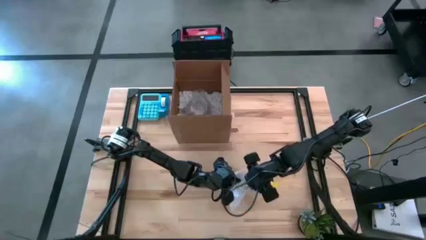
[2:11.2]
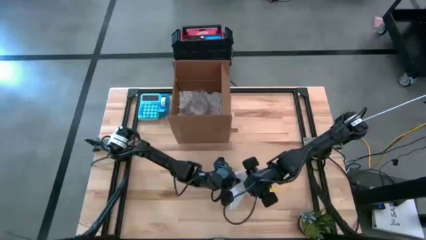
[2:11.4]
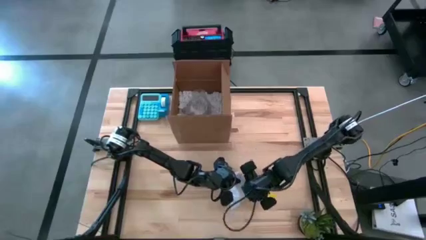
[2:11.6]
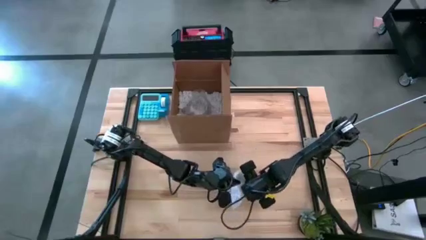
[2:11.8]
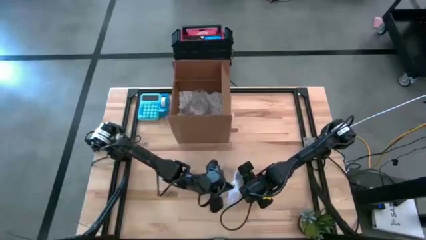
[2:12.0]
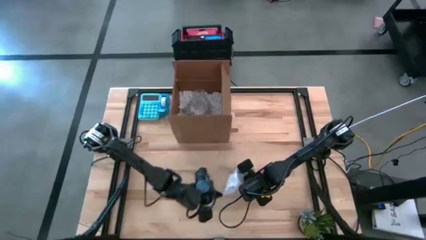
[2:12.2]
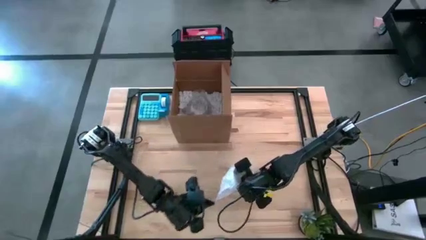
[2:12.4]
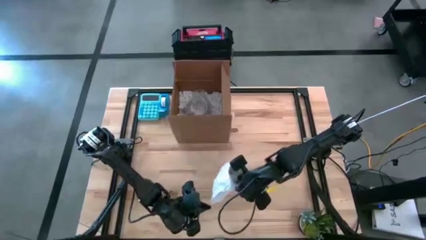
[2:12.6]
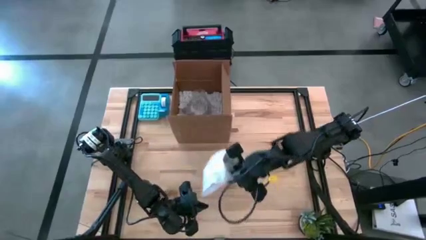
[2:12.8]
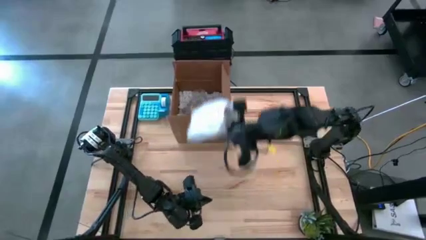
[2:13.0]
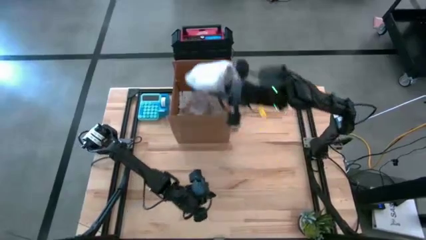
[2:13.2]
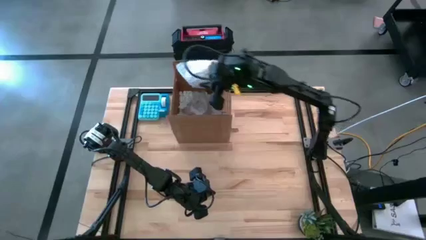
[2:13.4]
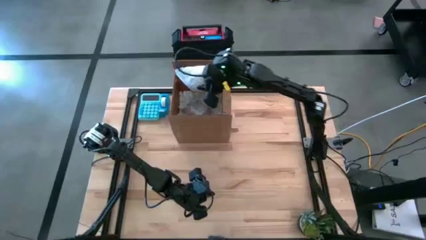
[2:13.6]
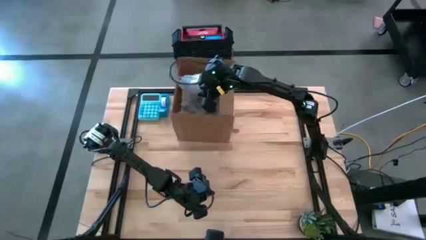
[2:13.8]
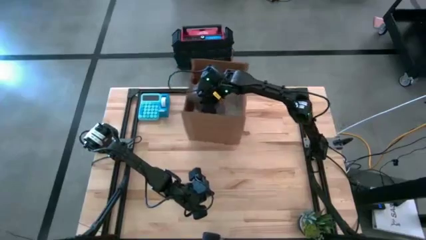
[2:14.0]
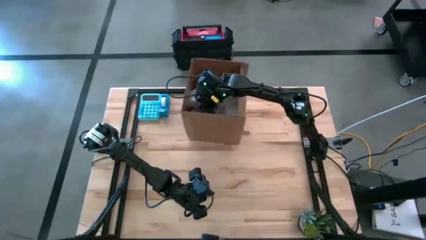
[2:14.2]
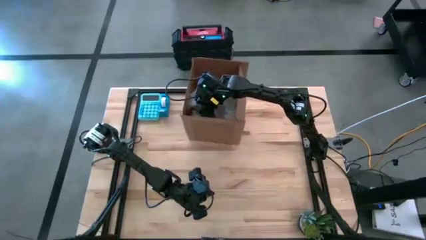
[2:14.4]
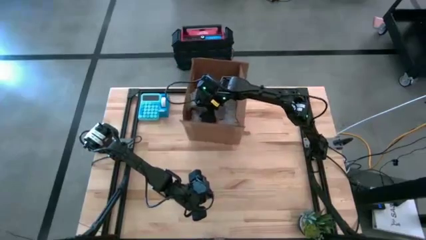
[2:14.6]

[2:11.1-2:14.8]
Task: wrap mug
Put the wrapped white mug into the box

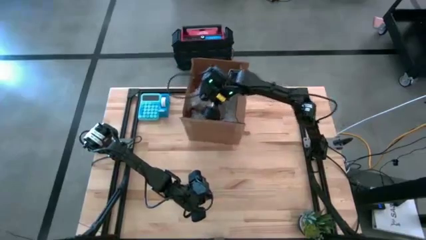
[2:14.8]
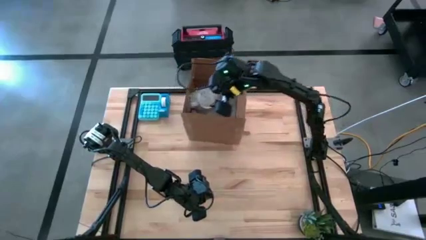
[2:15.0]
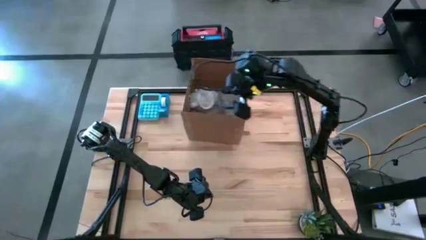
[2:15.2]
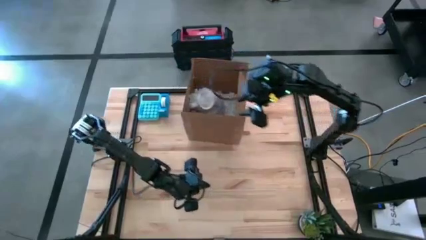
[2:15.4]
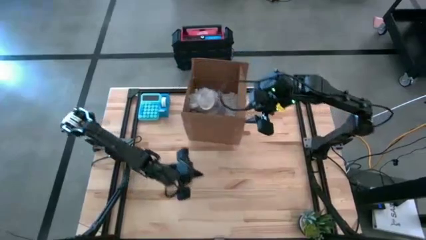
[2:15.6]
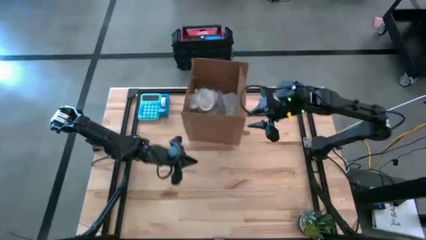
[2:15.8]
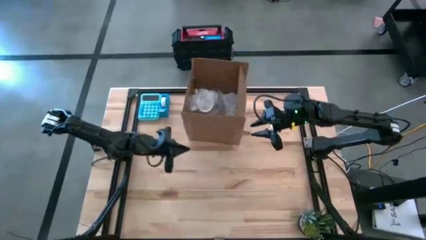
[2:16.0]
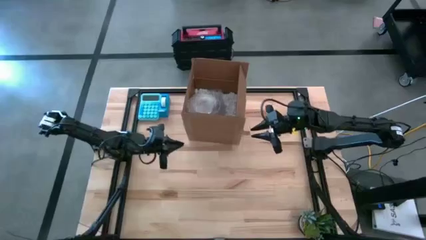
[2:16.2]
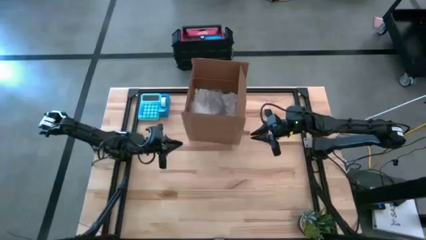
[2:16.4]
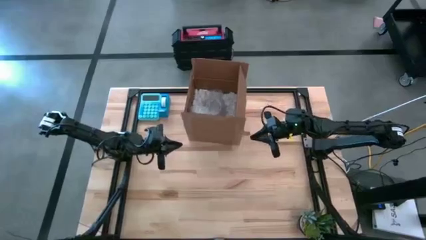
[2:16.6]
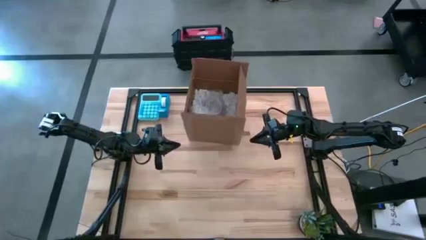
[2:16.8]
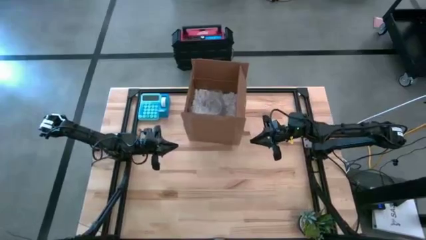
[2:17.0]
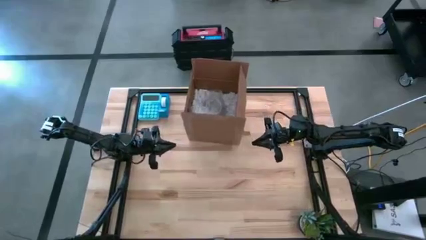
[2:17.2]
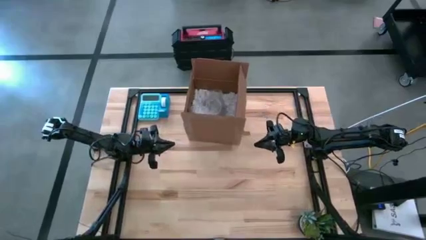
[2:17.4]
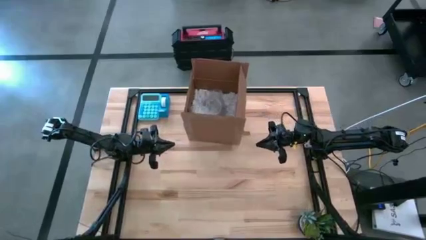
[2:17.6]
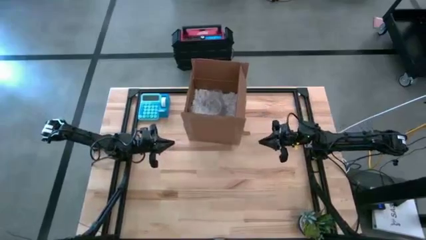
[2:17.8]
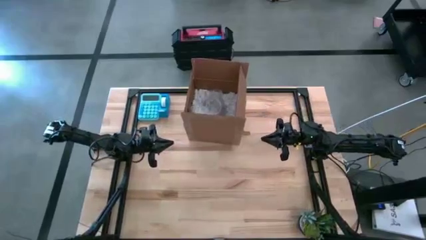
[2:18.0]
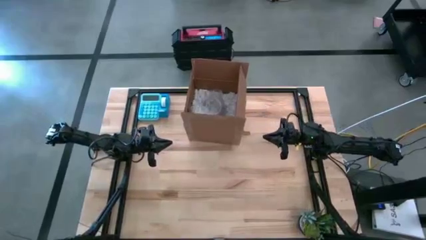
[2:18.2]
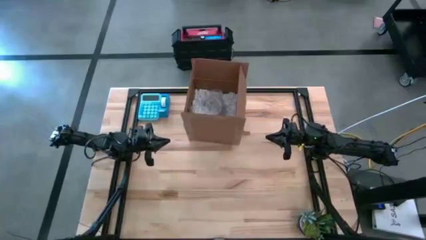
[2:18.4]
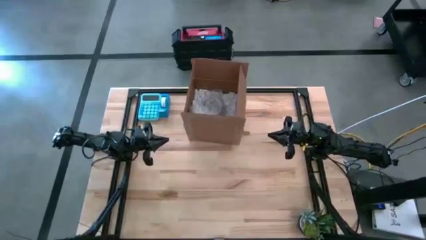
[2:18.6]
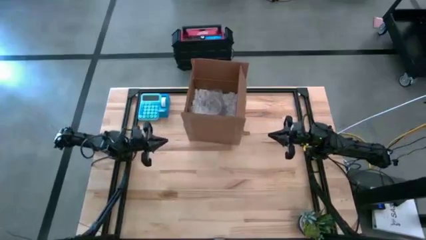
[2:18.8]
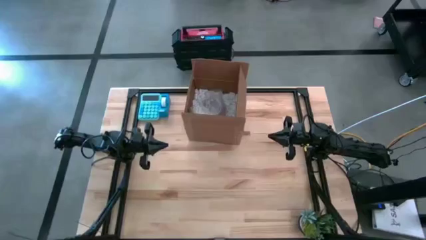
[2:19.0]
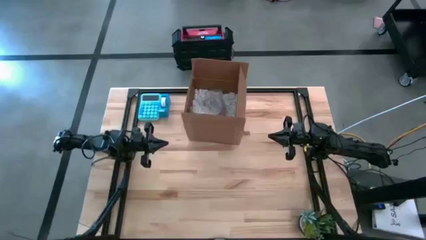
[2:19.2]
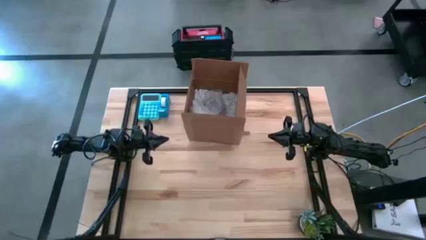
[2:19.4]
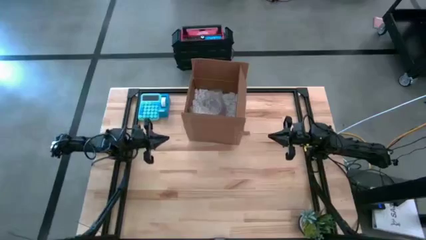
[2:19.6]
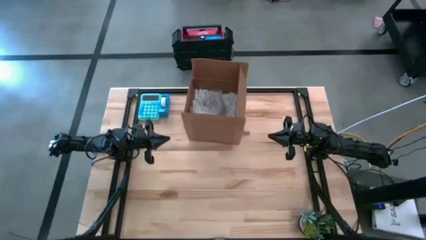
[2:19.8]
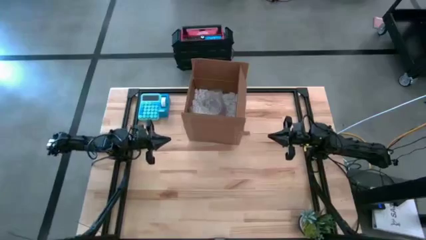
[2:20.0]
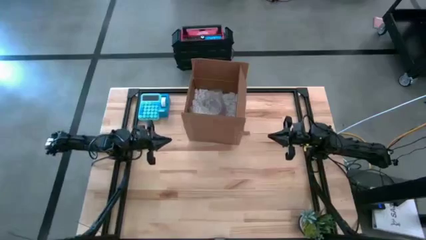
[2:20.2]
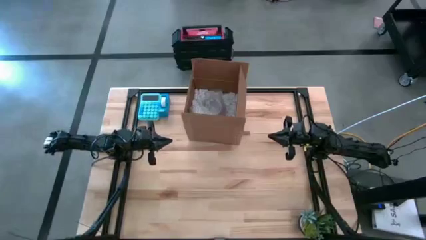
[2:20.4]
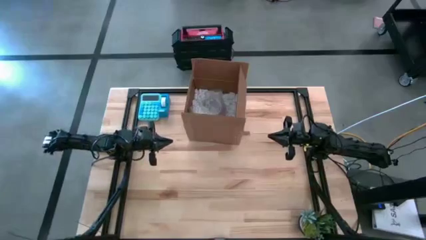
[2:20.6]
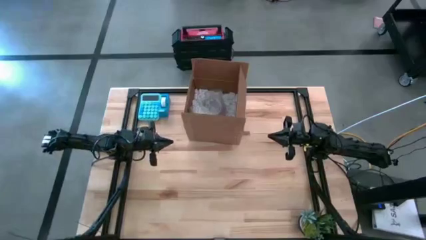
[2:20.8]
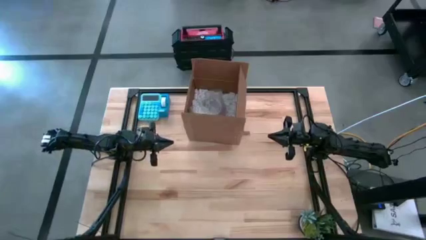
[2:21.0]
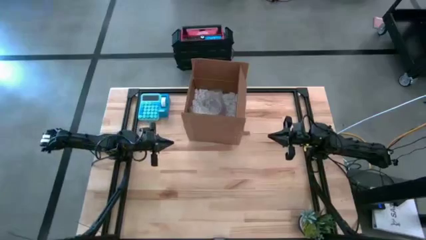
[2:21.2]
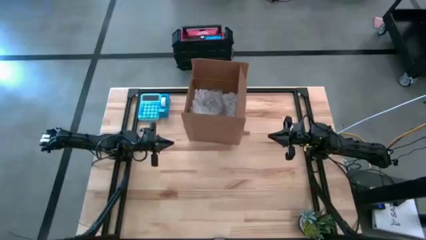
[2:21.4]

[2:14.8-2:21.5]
Return to Home Position

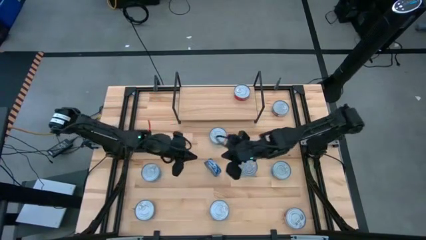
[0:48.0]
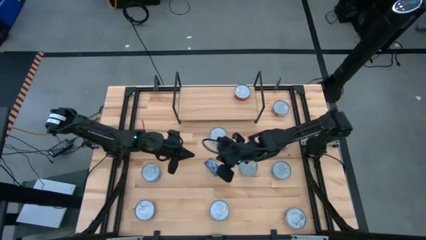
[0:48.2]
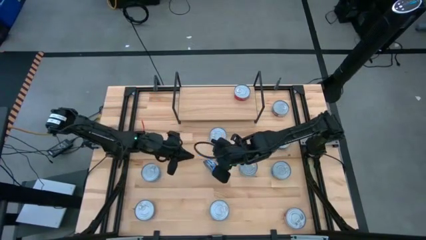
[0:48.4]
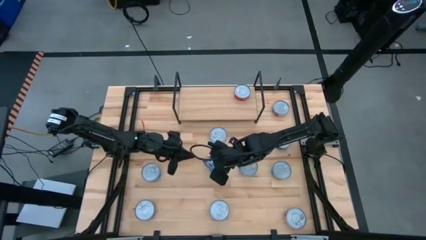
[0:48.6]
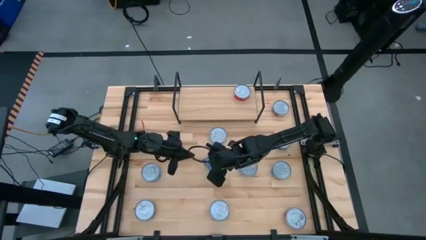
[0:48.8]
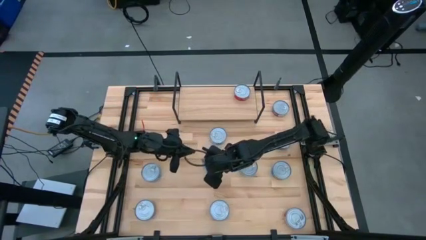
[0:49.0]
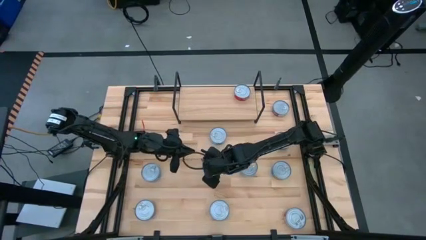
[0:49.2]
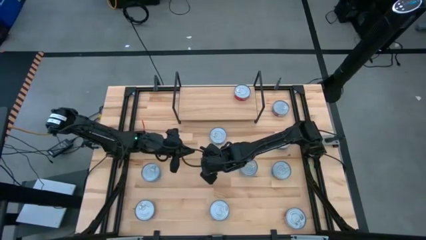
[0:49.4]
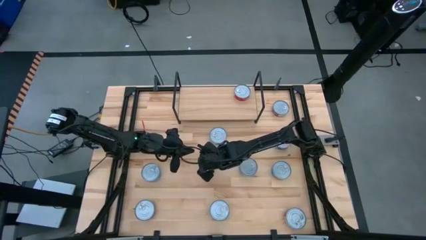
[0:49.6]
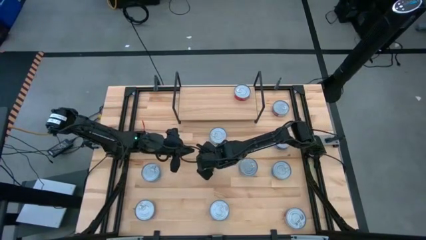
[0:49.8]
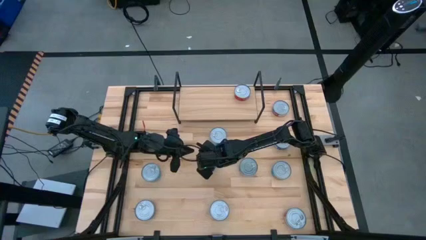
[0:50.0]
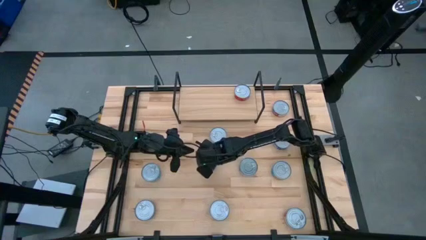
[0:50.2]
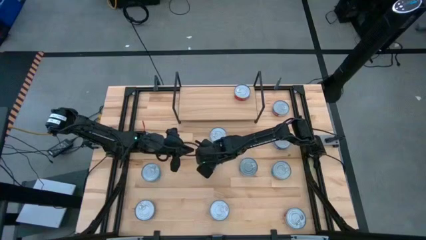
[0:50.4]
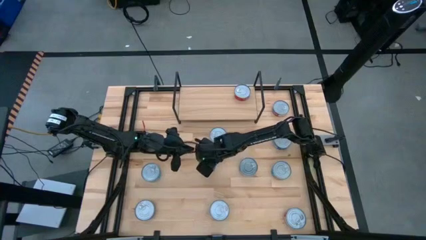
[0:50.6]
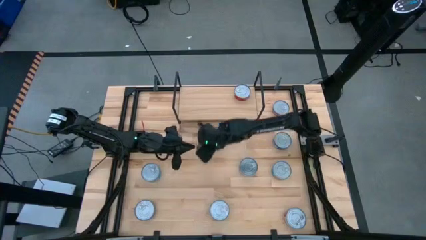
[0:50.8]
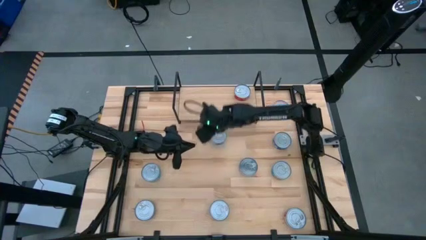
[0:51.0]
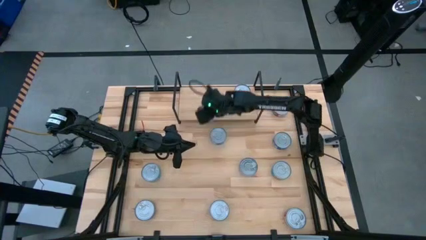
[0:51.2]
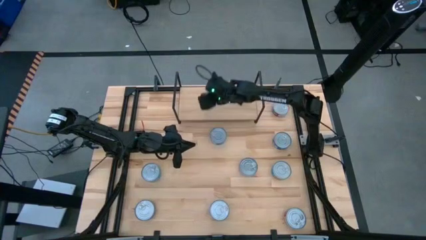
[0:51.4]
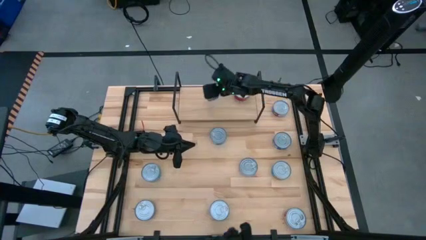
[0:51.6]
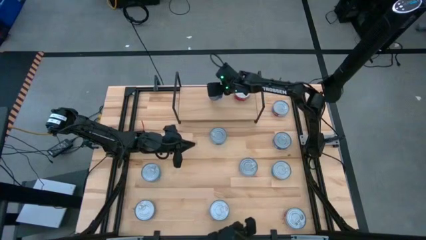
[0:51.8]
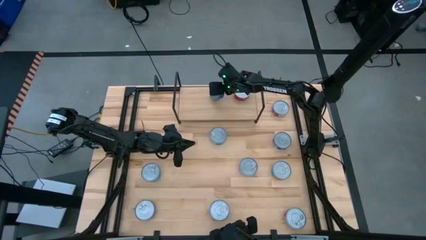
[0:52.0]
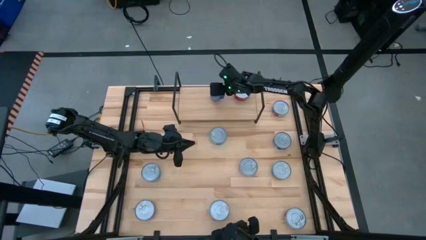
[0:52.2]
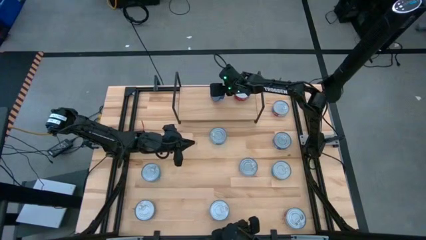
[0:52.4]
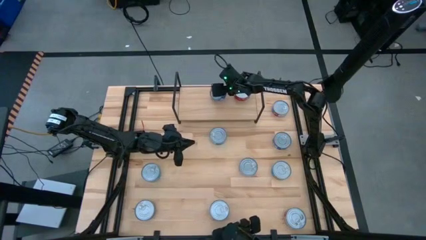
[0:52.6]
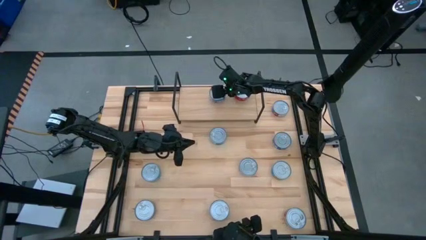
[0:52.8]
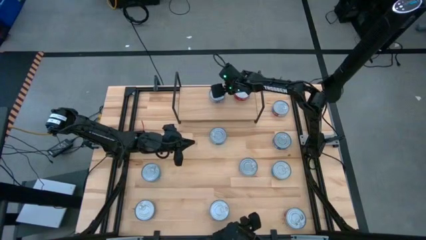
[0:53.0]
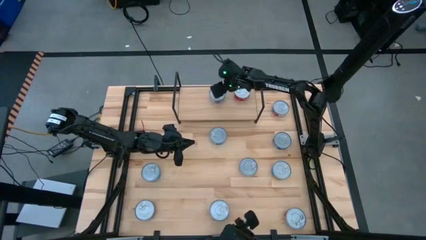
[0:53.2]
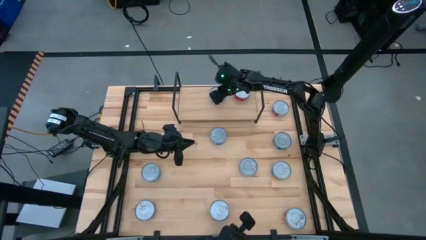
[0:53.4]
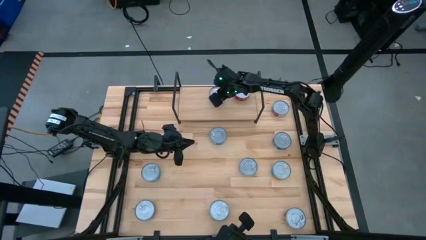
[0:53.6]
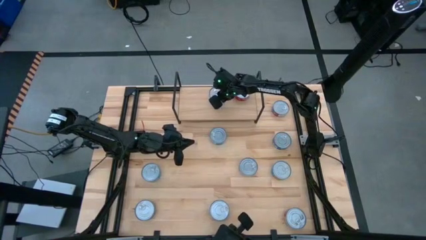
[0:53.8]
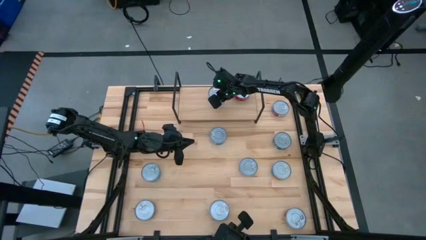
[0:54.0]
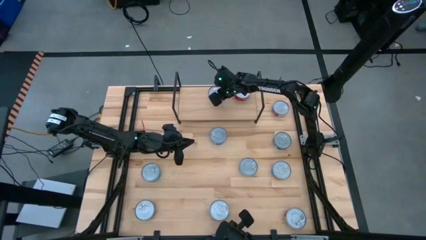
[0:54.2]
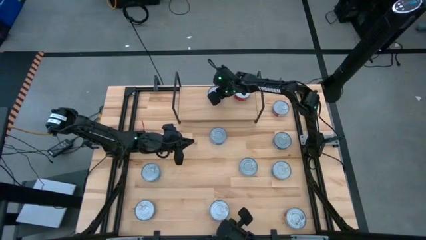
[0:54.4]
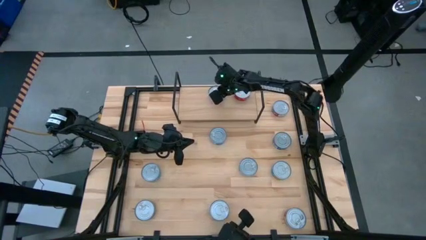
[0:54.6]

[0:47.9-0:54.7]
Task: Stack canned seafood by type on shelf
Put the center blue tuna can on the shelf aligned with the red tuna can
